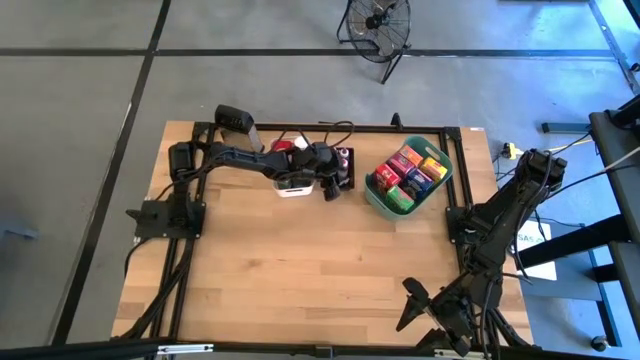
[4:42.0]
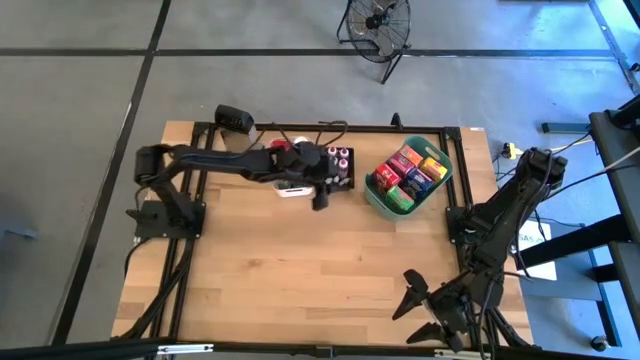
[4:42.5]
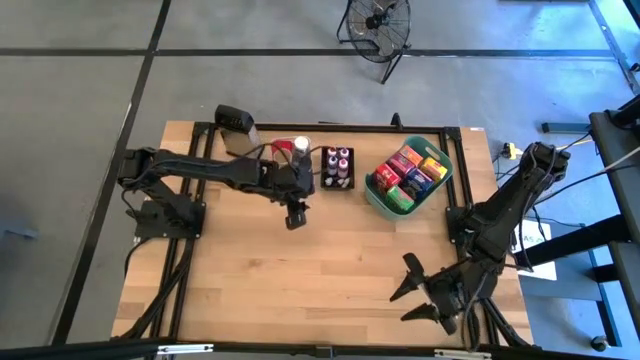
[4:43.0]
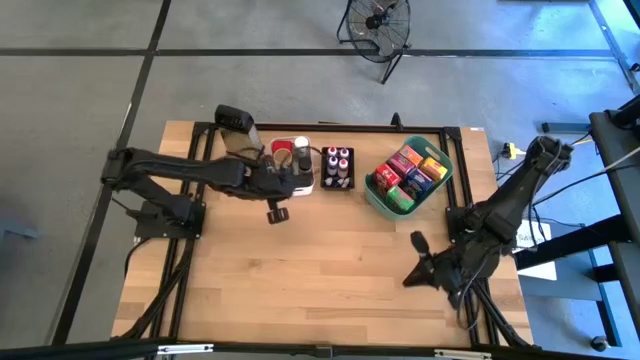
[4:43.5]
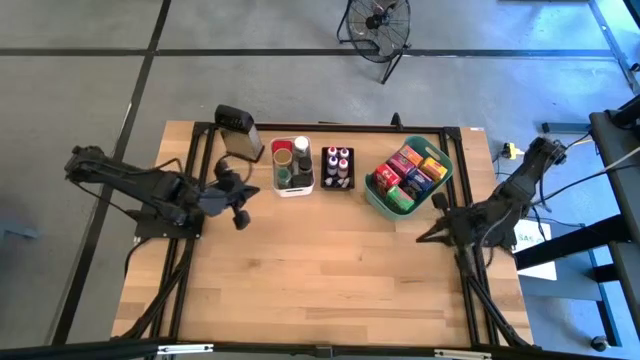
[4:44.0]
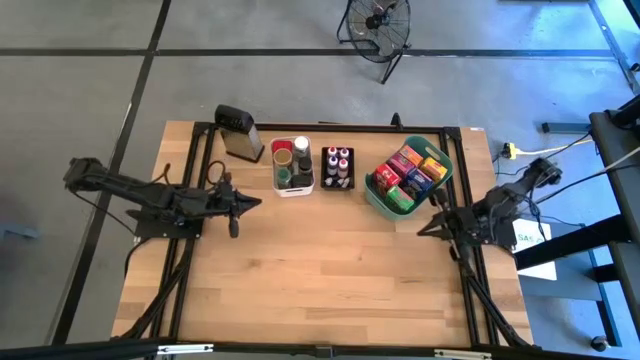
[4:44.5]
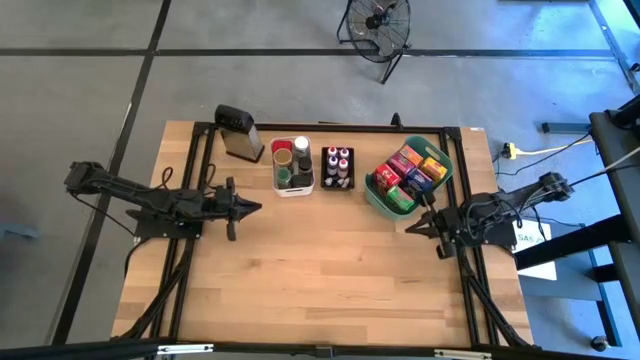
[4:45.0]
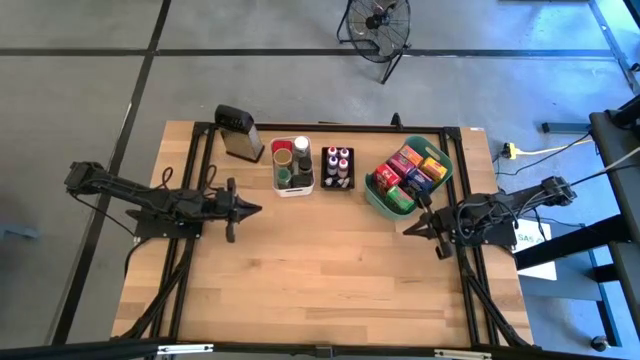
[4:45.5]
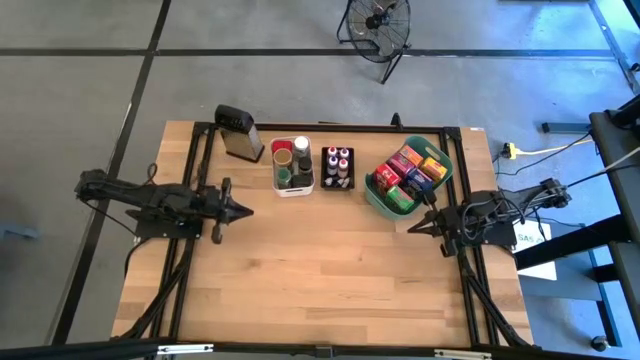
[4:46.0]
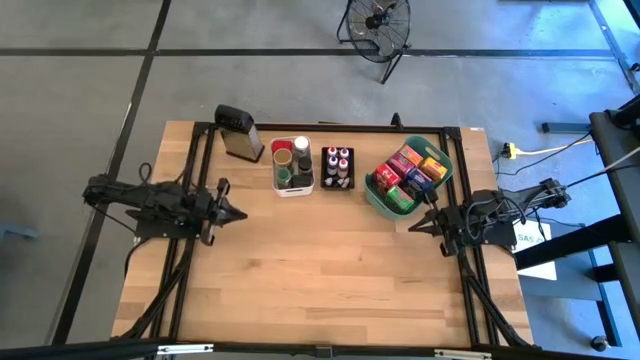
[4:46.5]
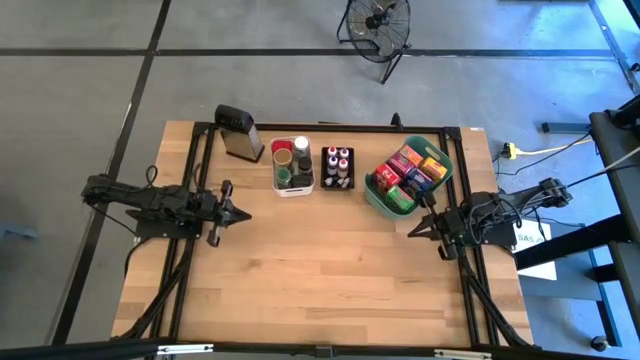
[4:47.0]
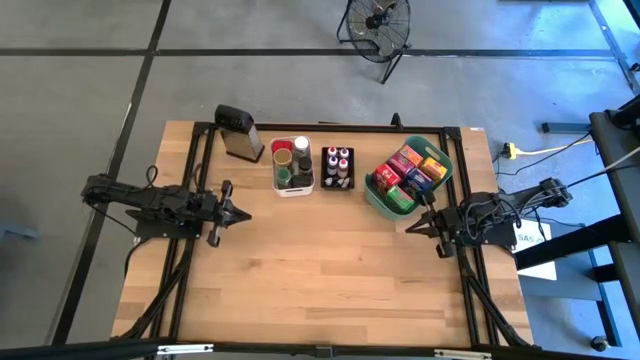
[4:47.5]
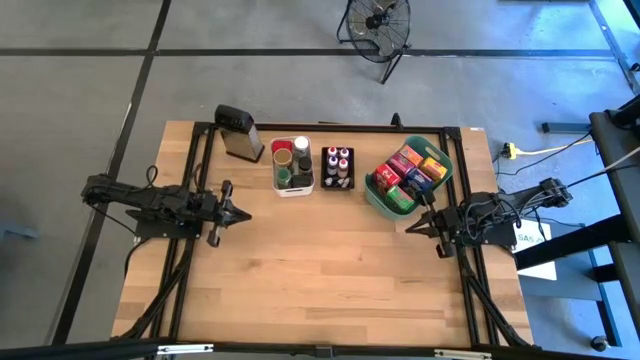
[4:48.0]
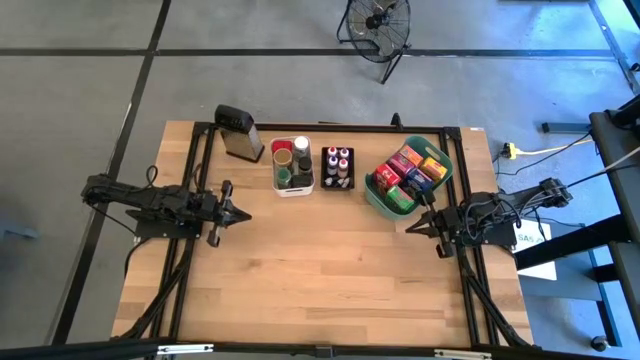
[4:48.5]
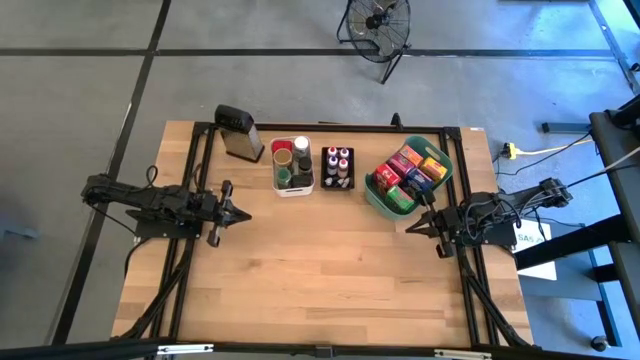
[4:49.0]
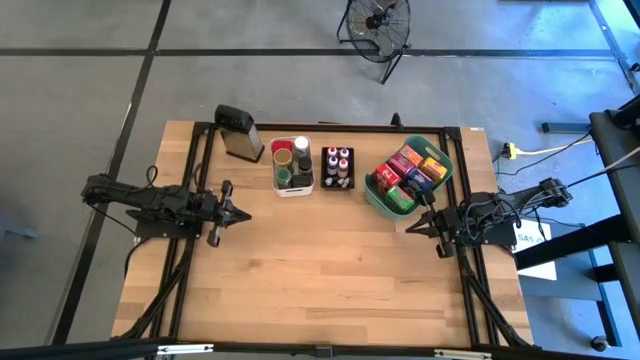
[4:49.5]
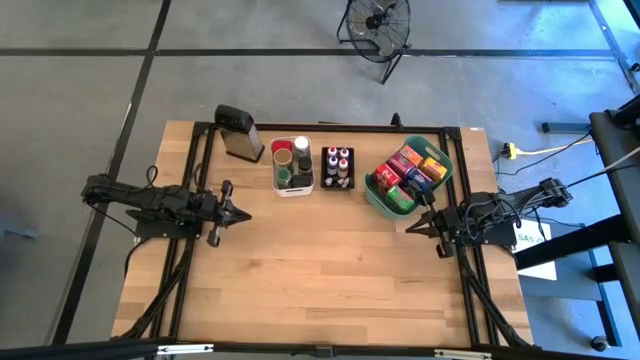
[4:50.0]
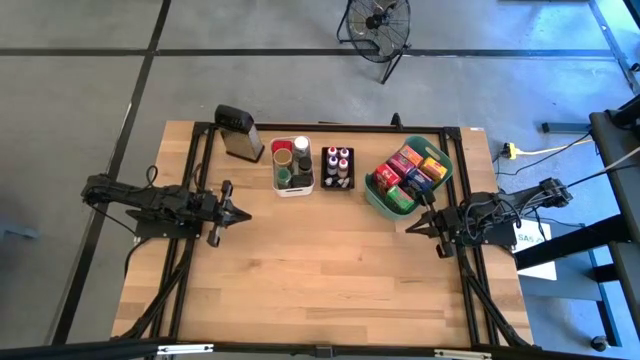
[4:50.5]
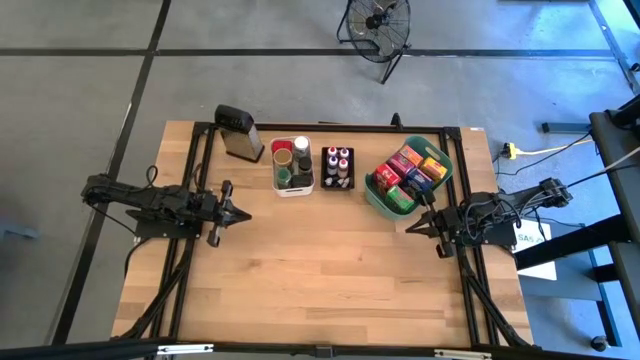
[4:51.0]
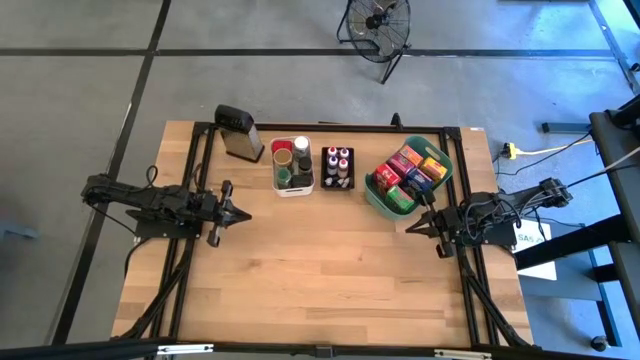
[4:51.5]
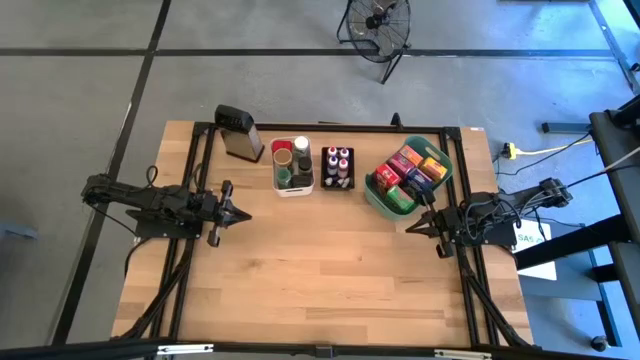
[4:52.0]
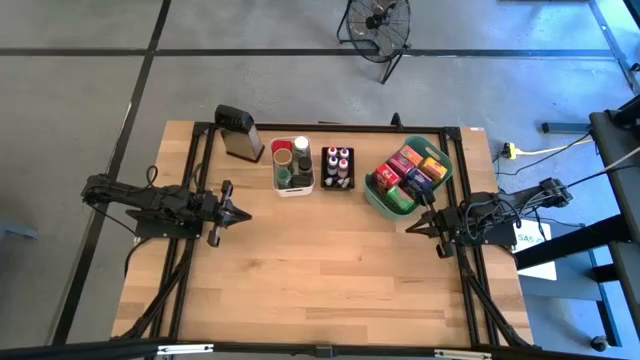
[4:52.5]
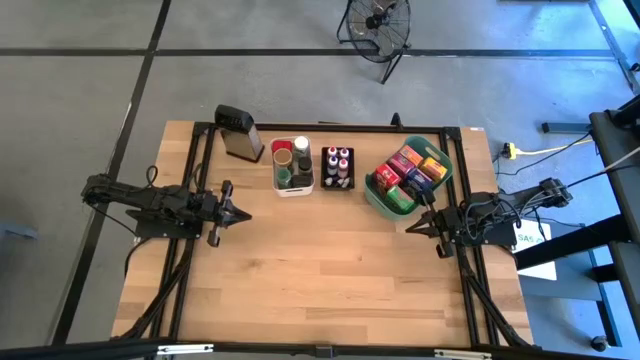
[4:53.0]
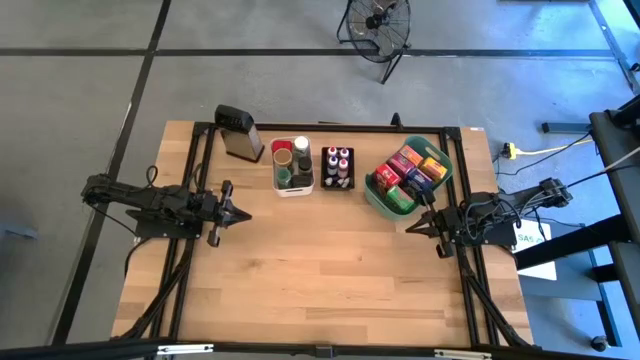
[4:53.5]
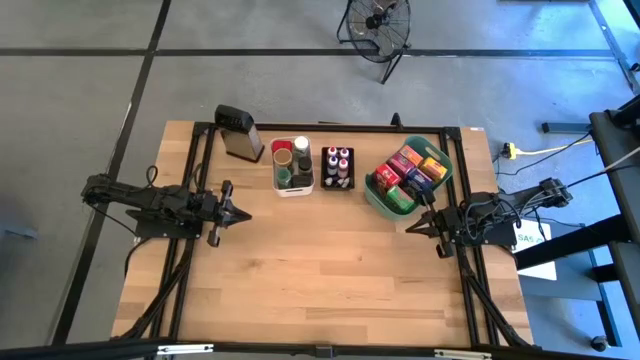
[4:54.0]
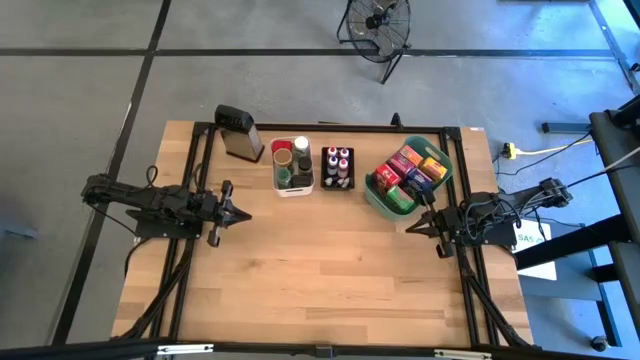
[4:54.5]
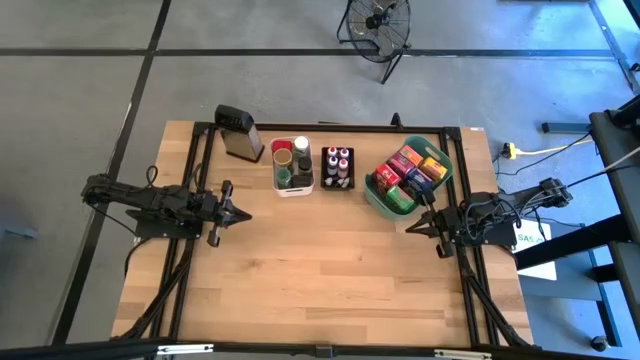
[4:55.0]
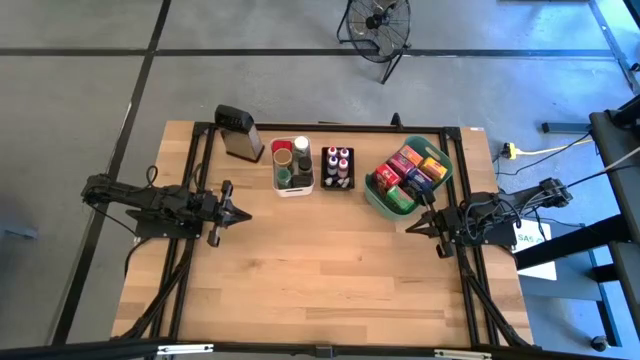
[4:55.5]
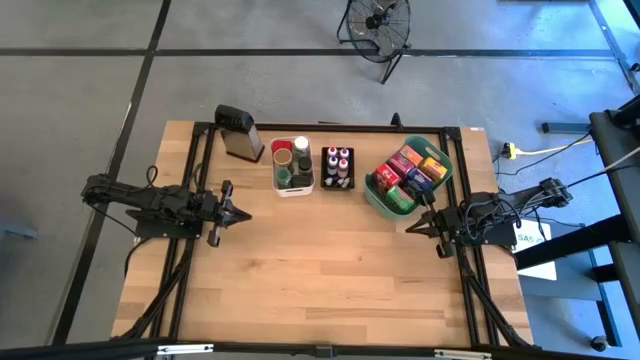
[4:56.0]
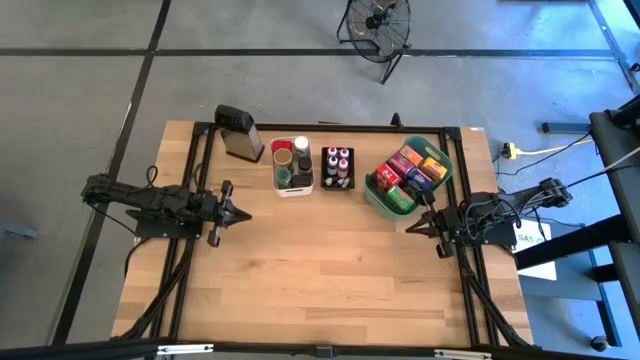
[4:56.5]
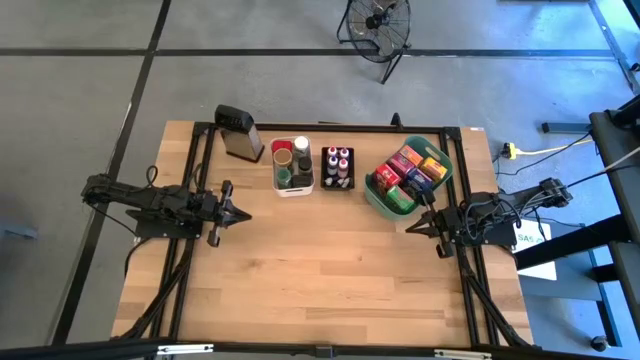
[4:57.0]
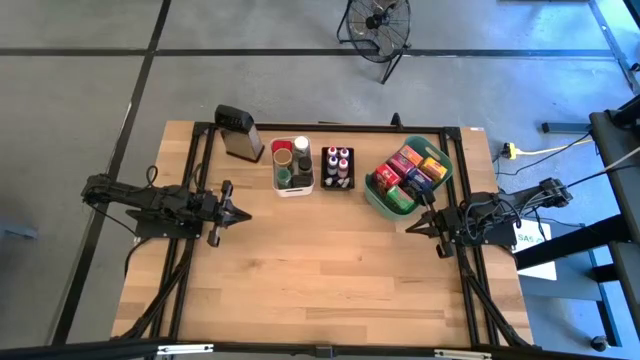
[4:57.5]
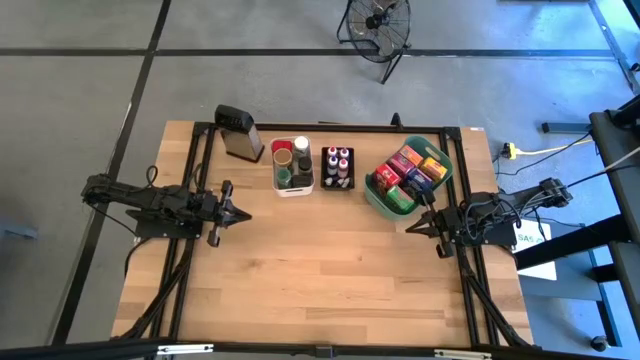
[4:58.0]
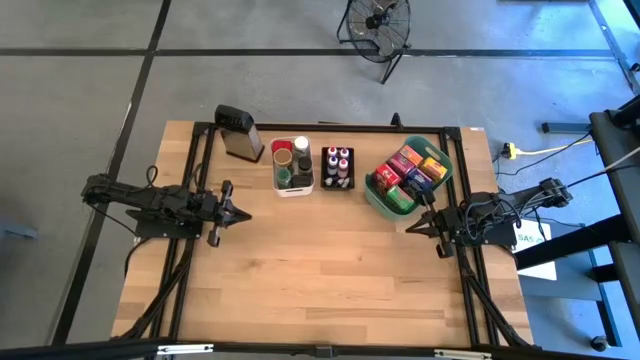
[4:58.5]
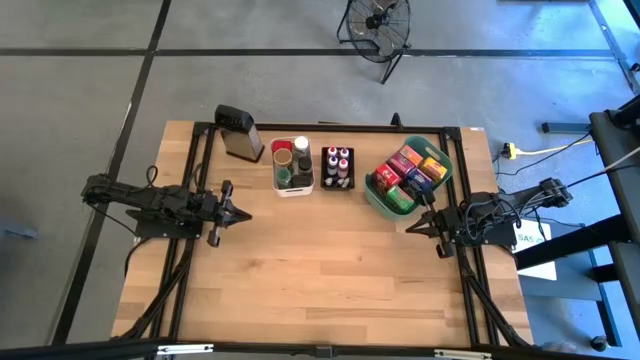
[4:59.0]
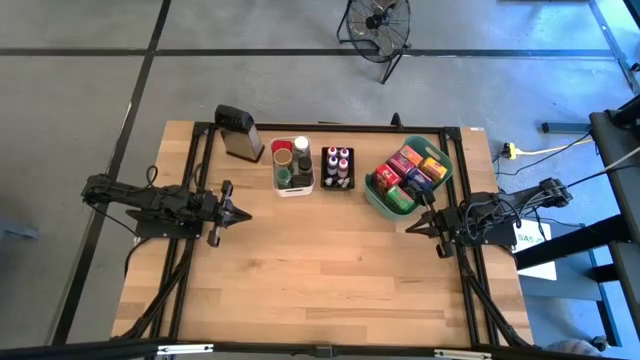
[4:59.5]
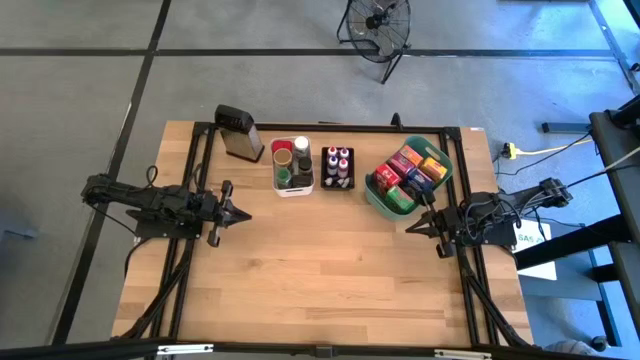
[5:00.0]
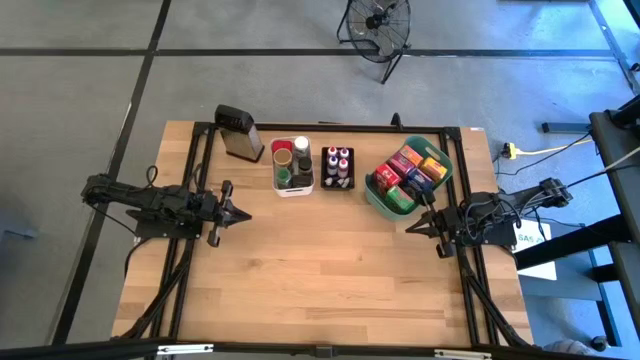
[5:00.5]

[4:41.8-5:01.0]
Task: Pick & Place Kitchen Items
Return to Home Position

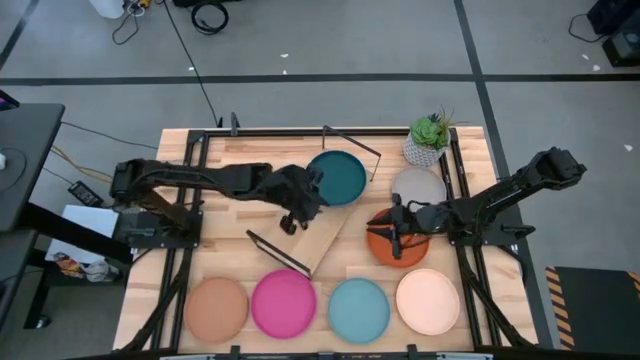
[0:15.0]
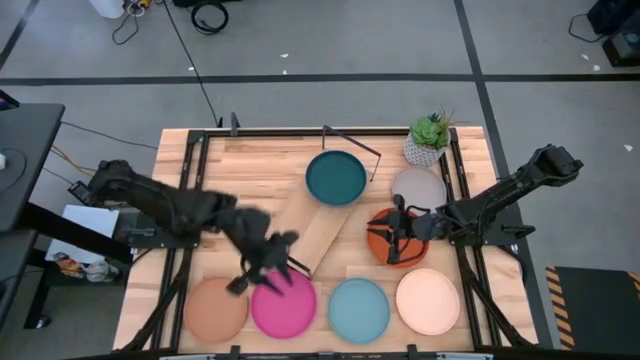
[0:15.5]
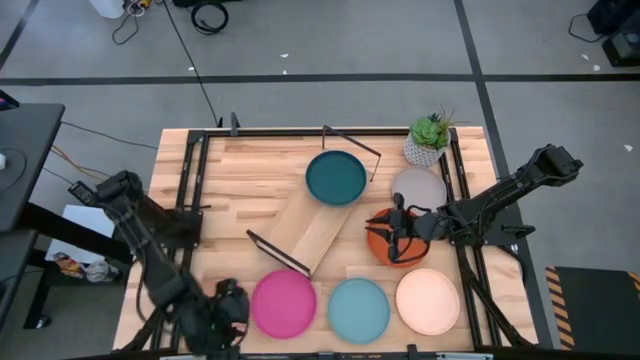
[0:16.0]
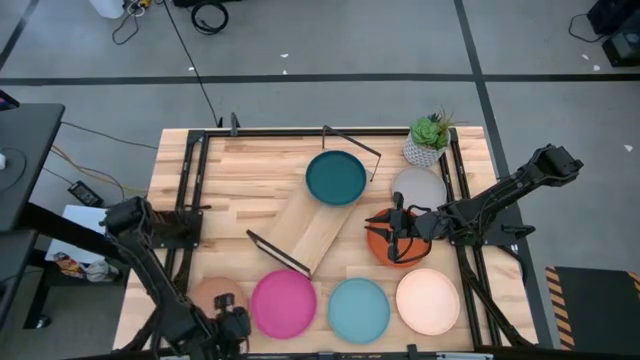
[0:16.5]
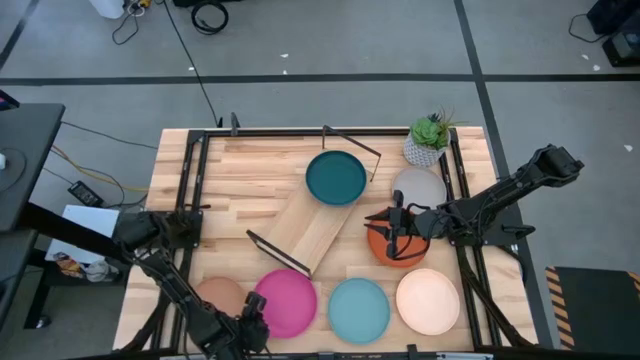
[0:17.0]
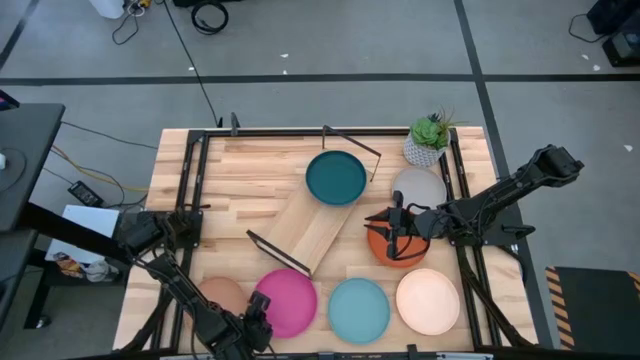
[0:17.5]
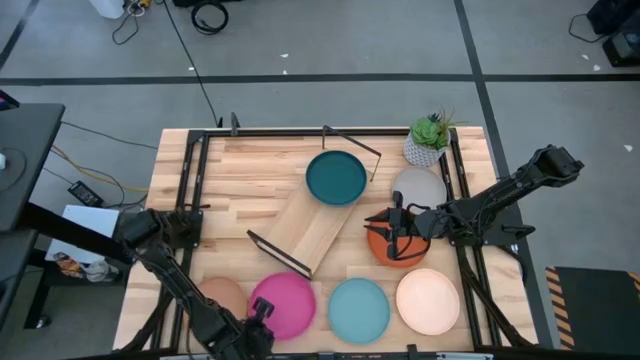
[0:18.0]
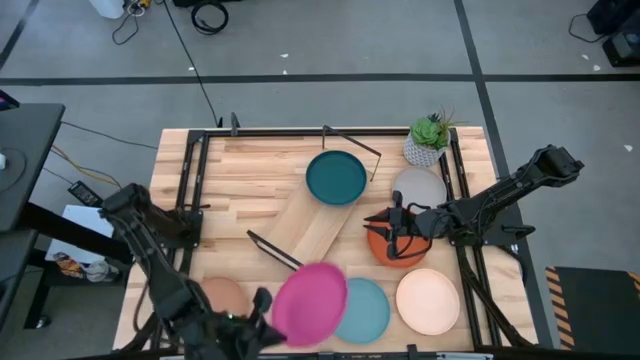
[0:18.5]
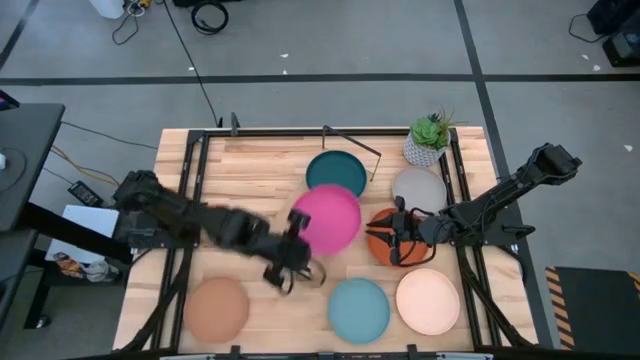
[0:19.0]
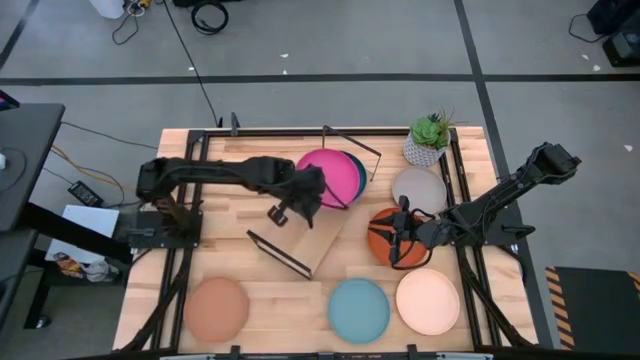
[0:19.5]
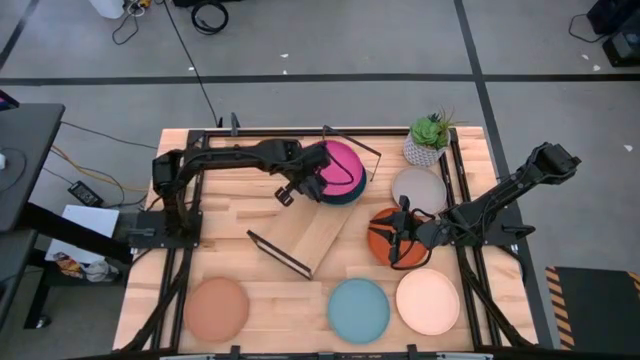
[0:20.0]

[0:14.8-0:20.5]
Task: Place and stack plates onto a shelf
Stack the pink plate on top of the dark green plate on the shelf
